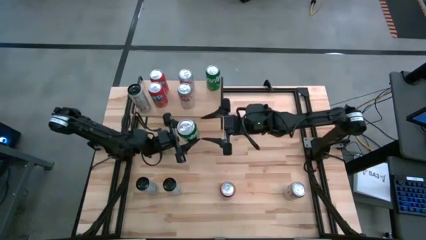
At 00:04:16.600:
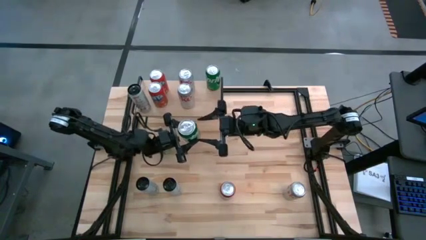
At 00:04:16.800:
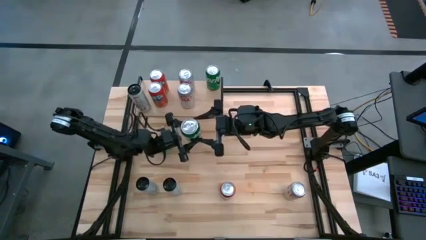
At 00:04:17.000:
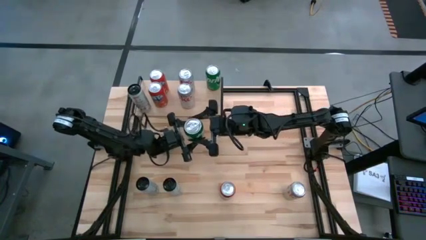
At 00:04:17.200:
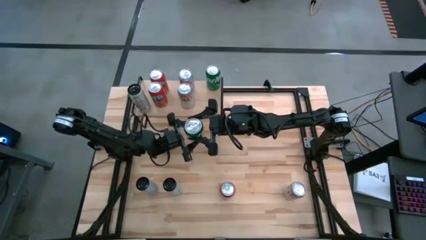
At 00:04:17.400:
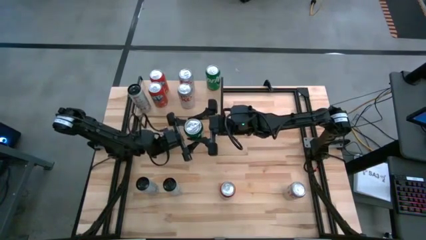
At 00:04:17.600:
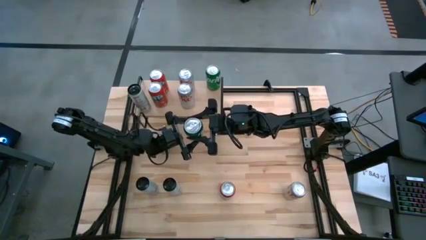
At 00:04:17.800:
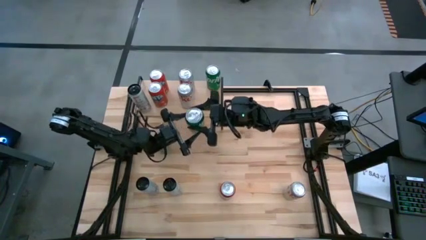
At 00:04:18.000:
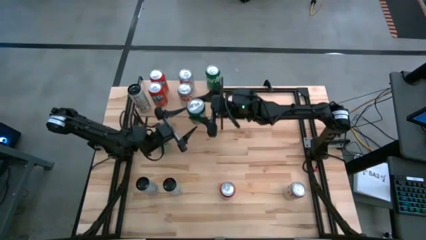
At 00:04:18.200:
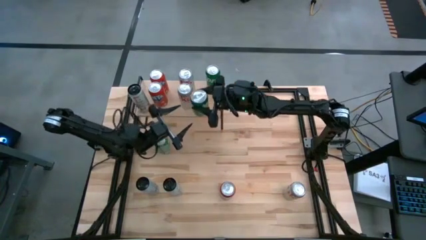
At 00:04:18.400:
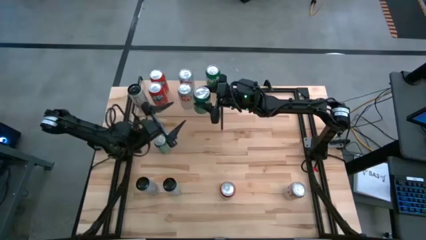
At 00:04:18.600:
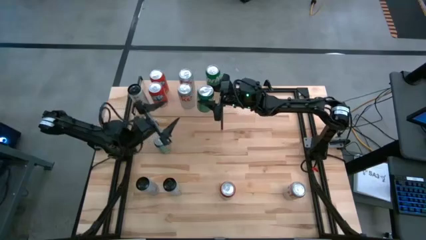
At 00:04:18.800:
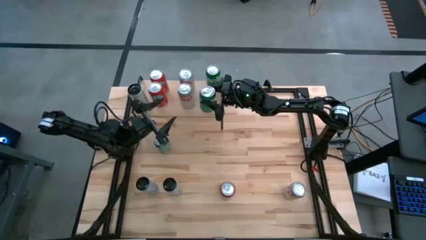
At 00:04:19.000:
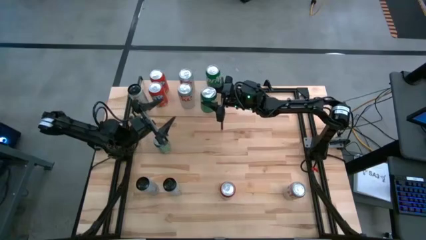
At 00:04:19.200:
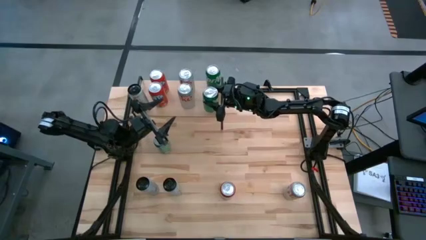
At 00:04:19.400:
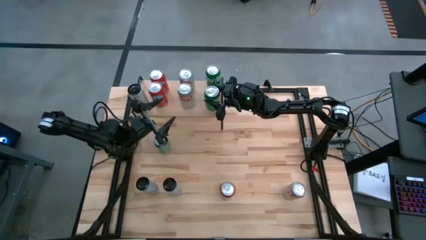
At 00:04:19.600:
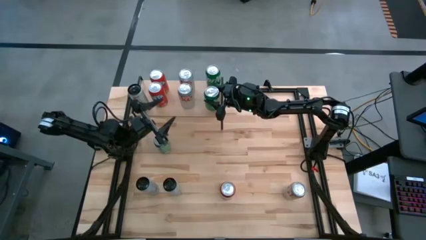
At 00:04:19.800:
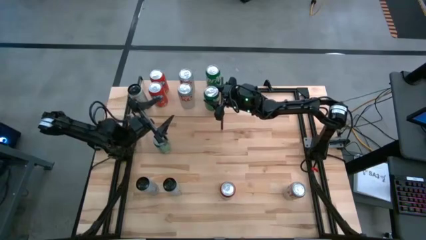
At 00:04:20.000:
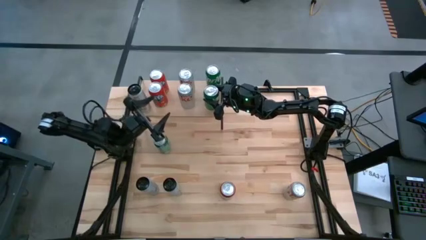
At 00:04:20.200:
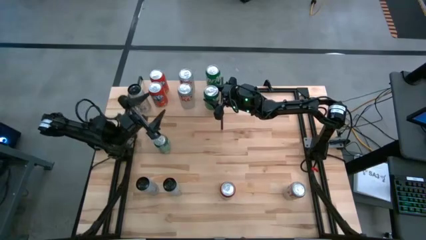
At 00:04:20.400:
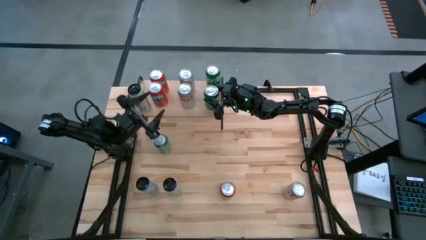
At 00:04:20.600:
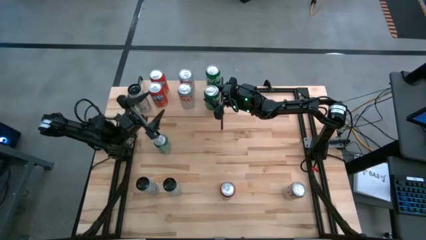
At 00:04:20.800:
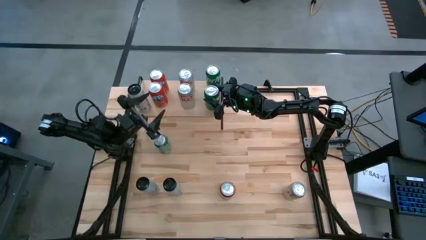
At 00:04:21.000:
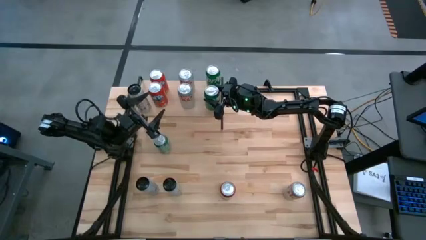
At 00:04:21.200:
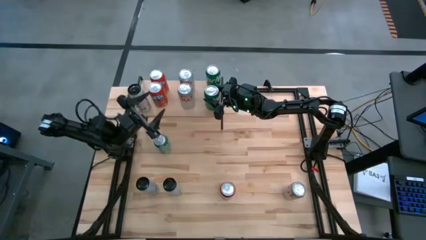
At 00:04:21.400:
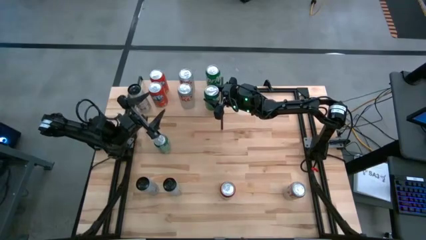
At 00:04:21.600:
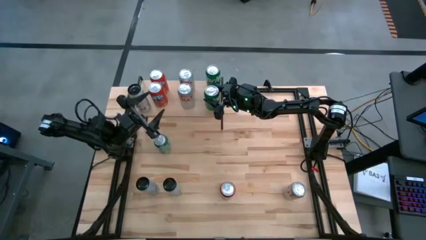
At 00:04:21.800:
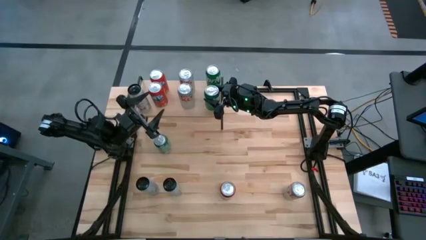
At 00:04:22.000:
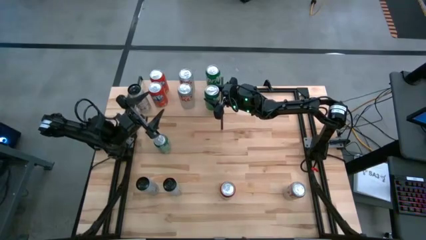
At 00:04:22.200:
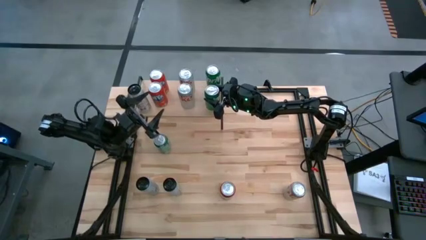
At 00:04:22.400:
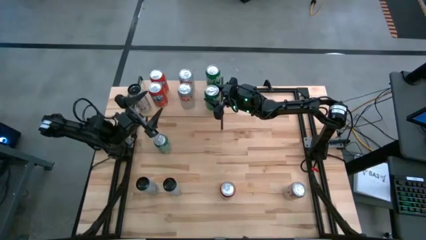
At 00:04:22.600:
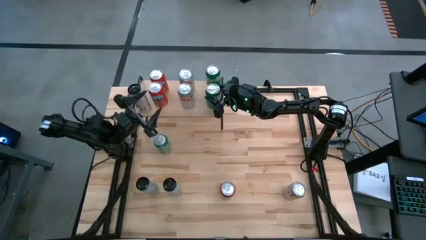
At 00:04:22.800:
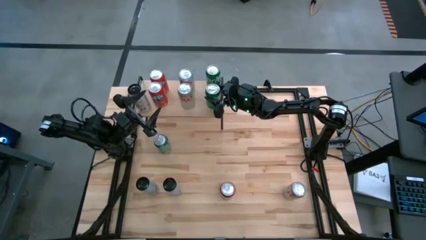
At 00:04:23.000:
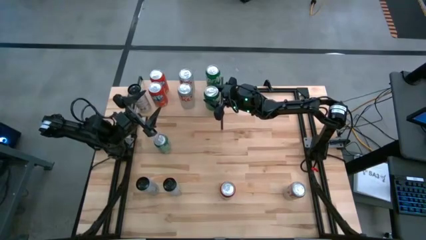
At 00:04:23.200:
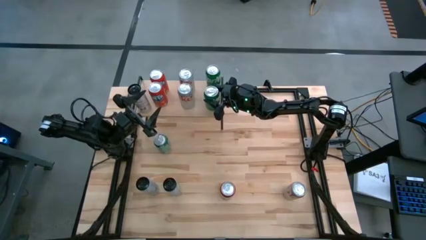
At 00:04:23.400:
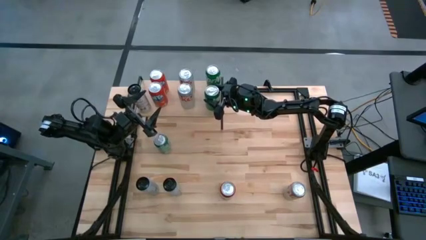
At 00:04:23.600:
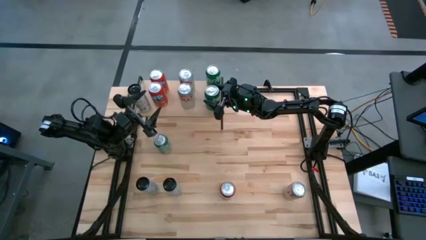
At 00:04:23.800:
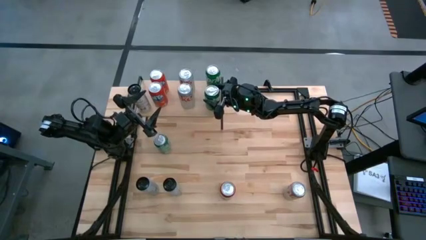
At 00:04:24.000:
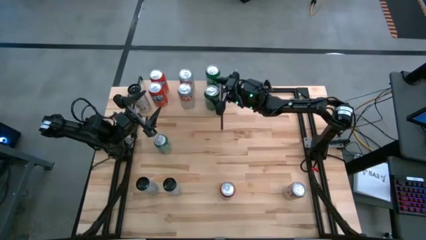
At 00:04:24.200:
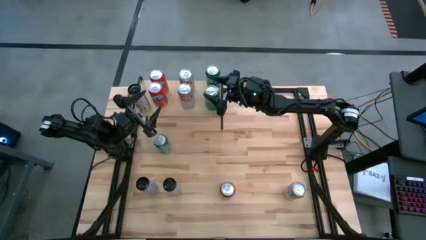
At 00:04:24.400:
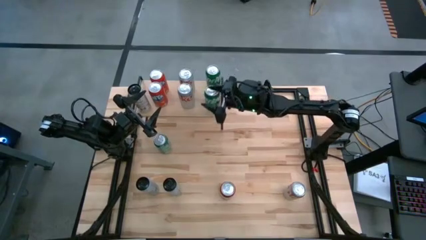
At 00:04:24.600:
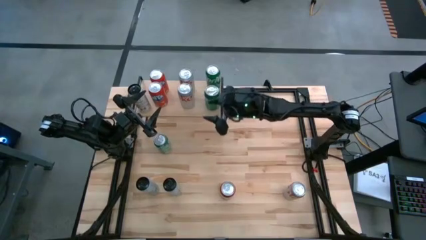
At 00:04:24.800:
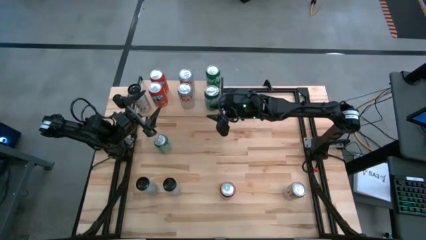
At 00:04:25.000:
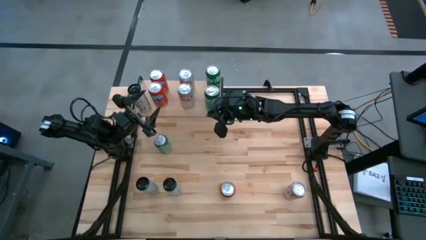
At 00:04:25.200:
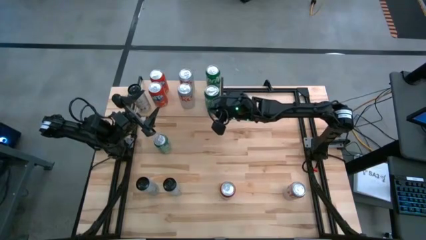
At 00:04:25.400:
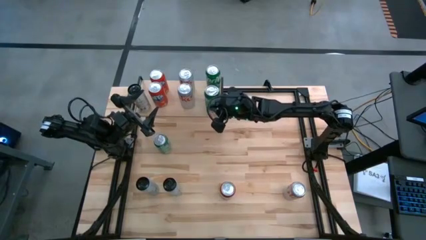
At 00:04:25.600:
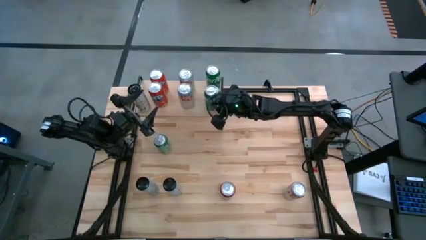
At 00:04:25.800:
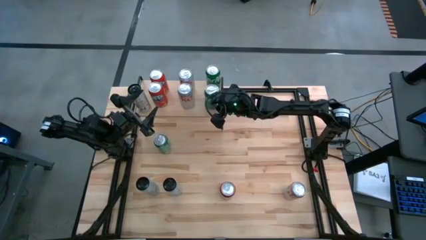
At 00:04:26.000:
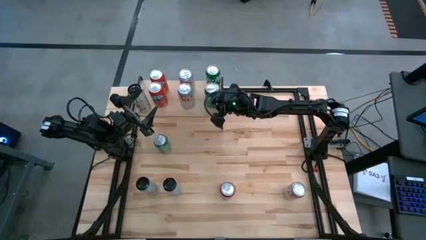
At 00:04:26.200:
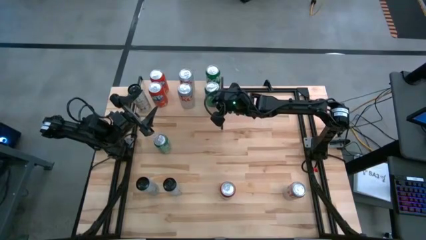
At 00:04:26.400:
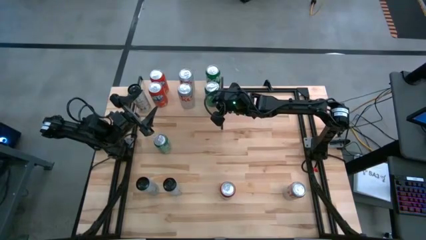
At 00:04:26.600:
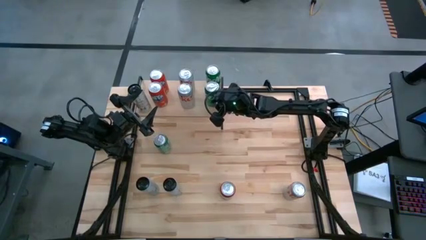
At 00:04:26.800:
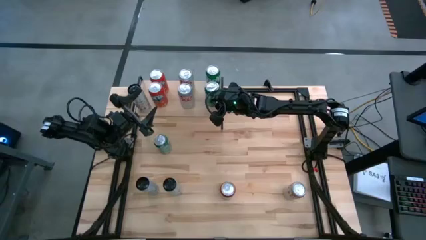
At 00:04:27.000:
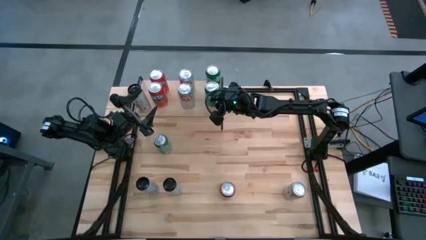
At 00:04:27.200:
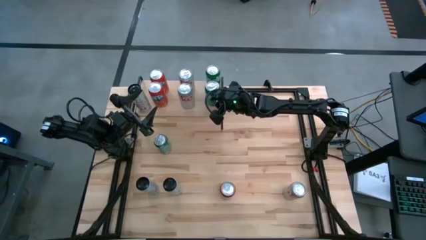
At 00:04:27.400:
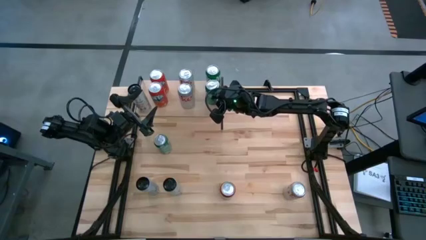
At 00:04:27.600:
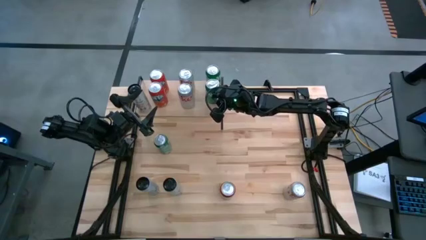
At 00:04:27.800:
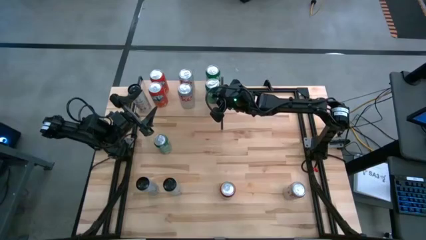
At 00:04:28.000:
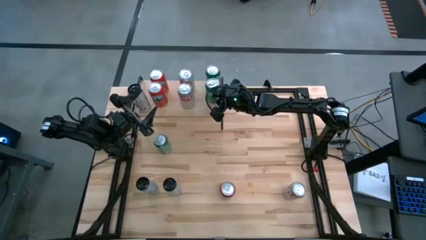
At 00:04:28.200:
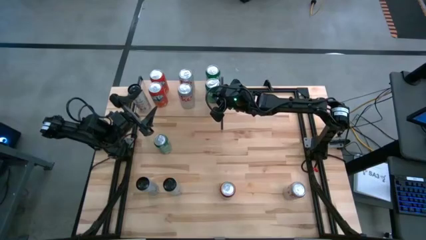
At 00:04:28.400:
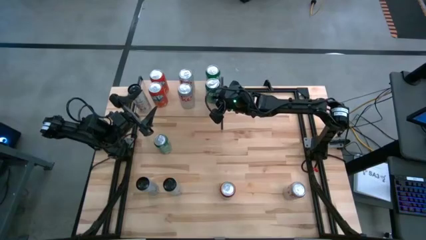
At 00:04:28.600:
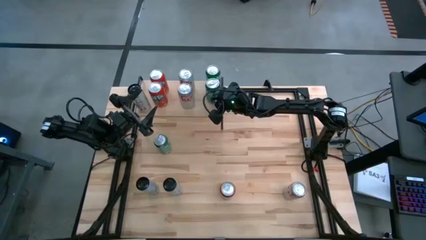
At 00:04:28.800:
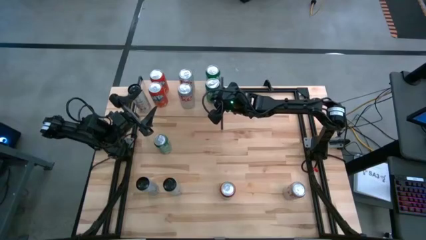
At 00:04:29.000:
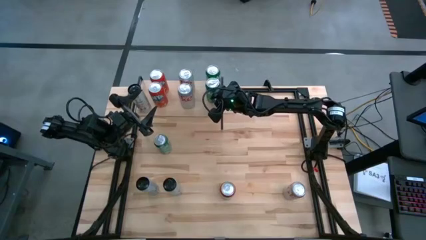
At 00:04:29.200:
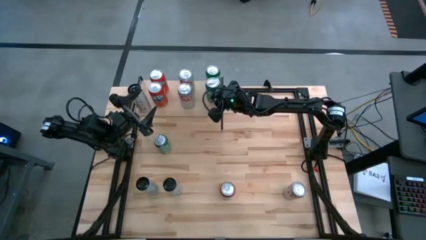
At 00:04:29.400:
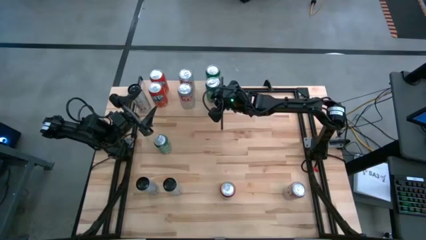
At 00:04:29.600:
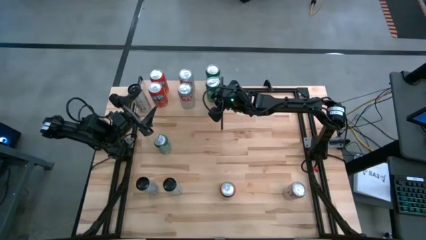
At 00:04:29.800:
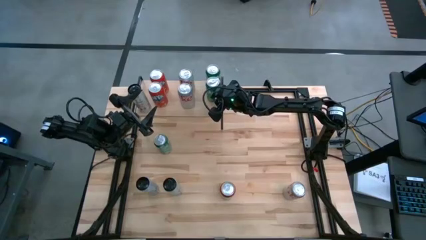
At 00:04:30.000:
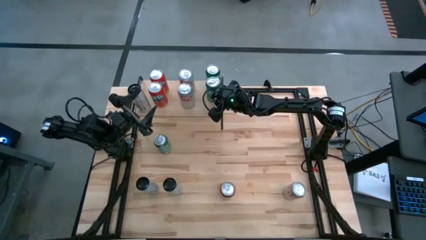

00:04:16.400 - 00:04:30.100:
Task: Place canned beverage on shelf
Put the bottom green soda can aligned with the other green soda can on the shelf
